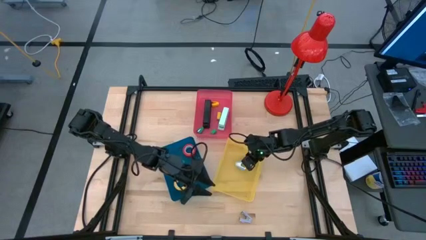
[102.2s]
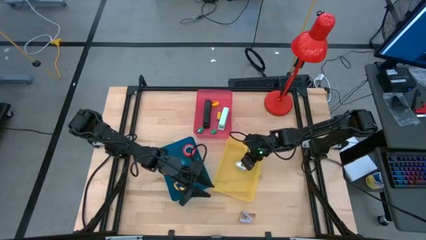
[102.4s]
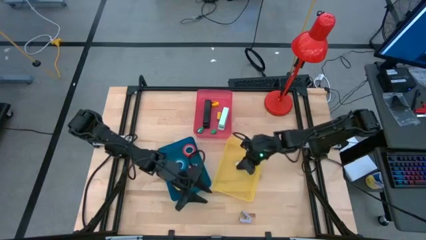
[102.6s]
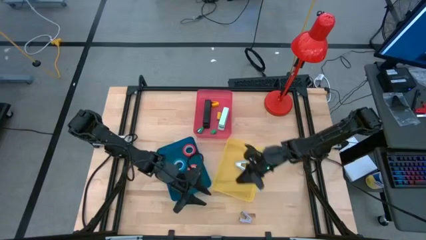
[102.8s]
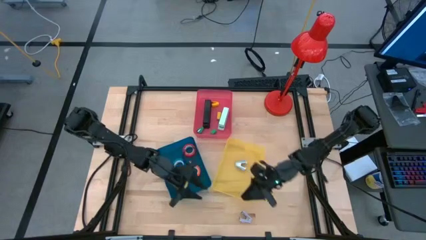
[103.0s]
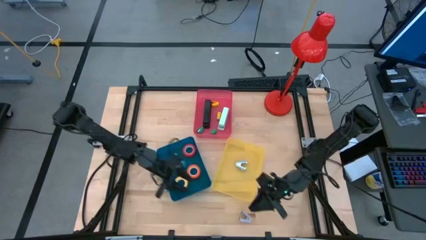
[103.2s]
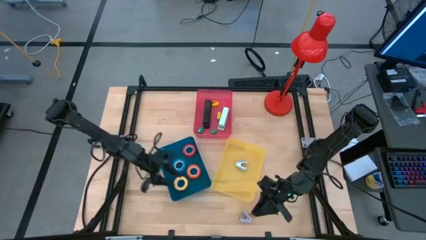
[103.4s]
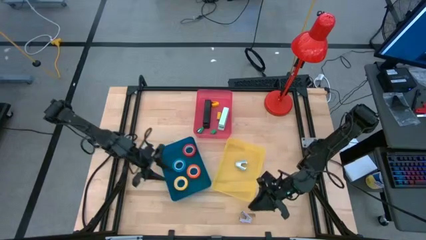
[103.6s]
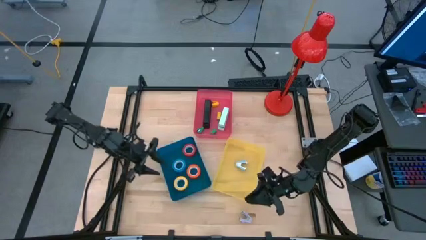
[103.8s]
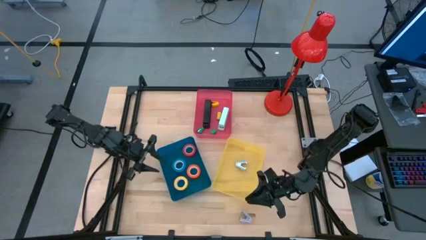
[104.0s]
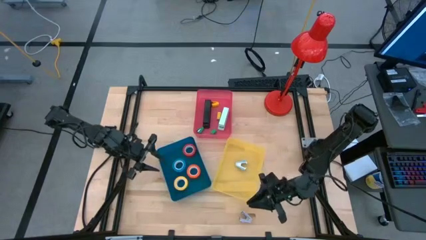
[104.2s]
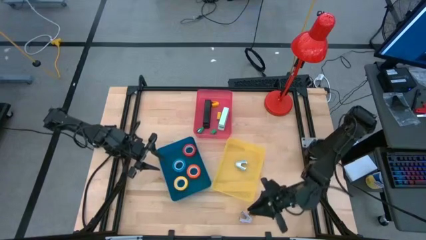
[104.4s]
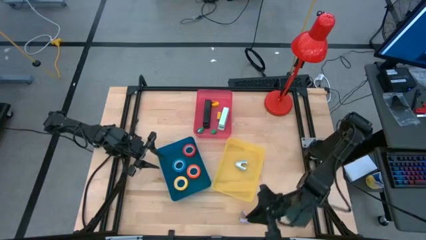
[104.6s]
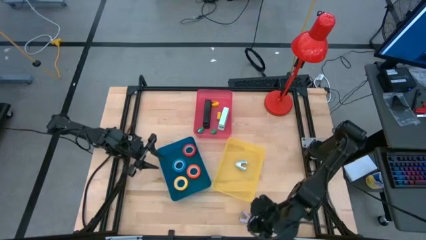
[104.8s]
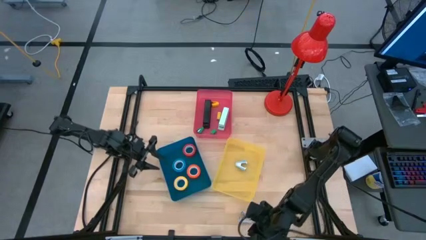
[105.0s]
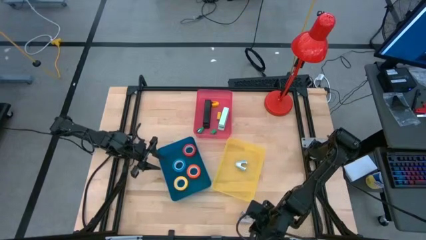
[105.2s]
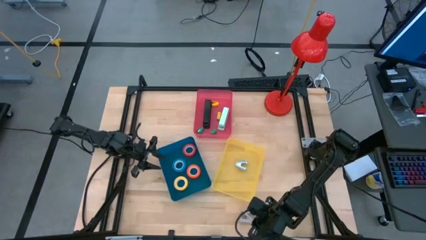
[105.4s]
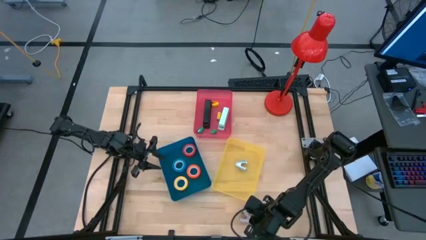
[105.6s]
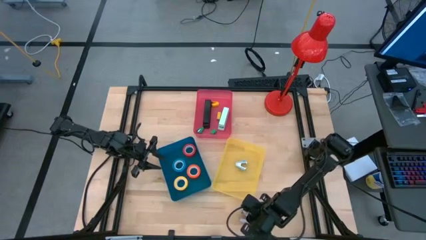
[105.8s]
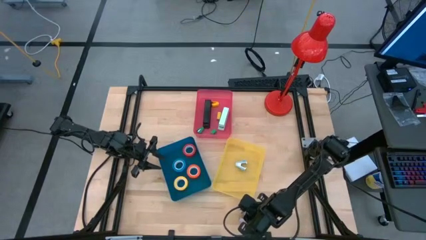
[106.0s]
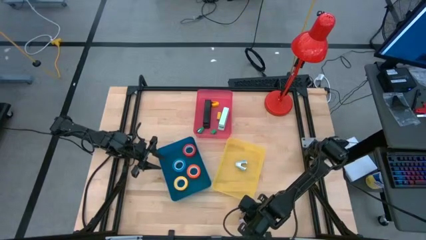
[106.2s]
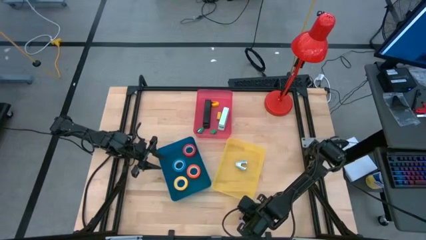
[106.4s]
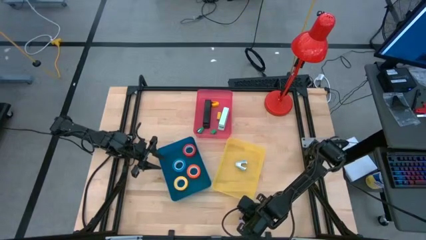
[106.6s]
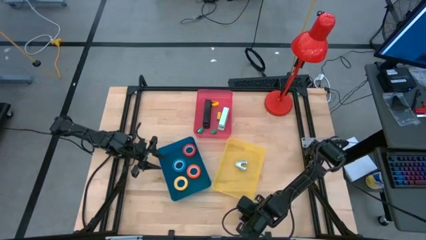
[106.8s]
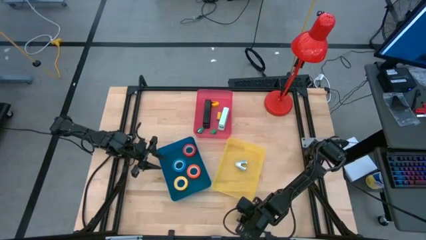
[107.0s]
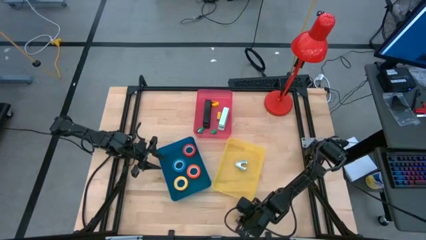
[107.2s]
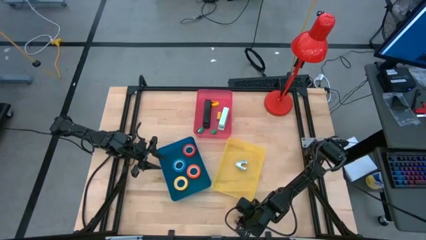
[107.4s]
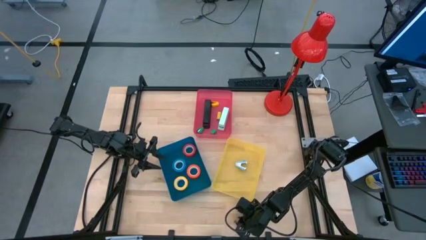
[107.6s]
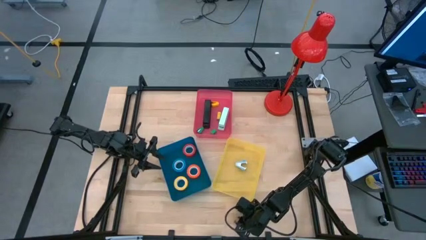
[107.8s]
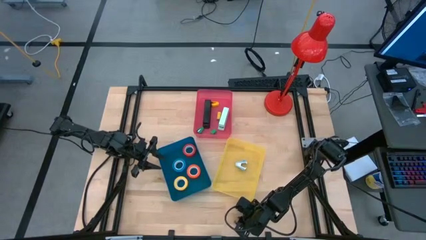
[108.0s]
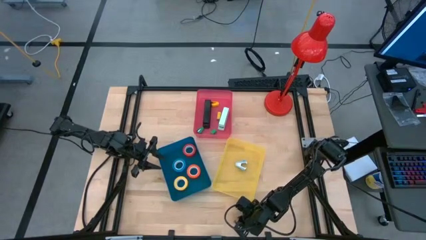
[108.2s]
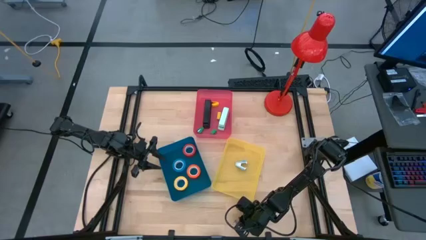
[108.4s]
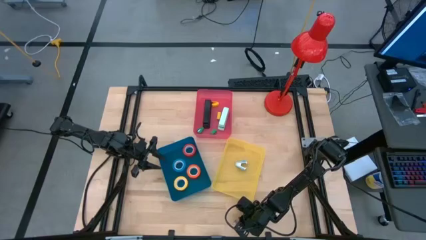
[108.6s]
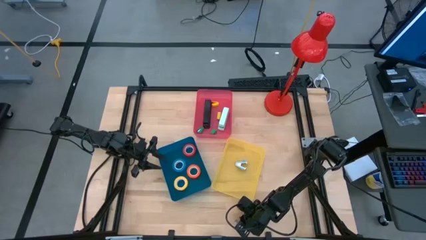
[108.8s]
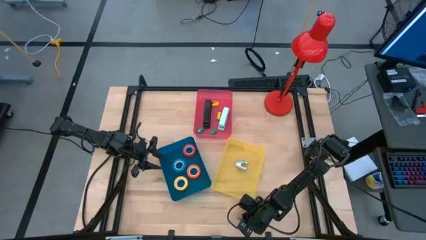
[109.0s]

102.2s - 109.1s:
Task: Pick and place Stapler, Stapler remover, tape
Put the violet staple remover into the yellow bin

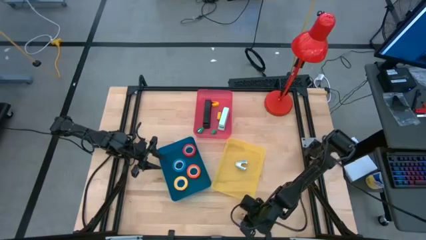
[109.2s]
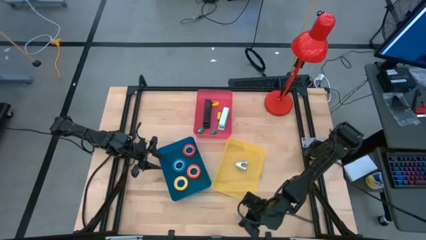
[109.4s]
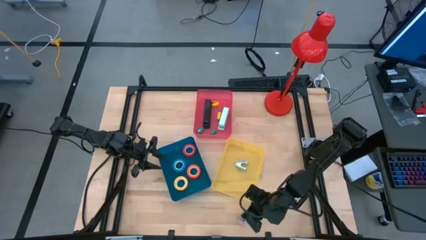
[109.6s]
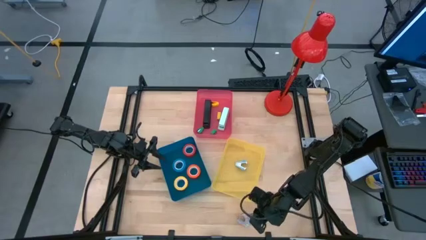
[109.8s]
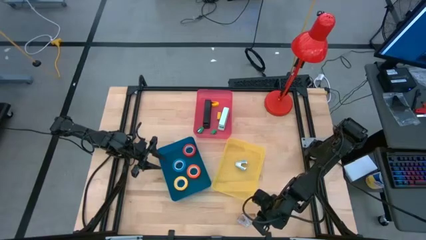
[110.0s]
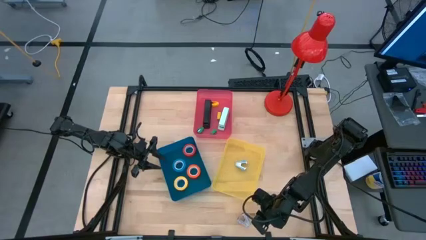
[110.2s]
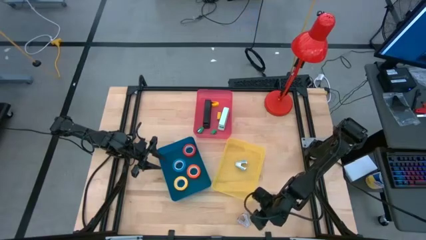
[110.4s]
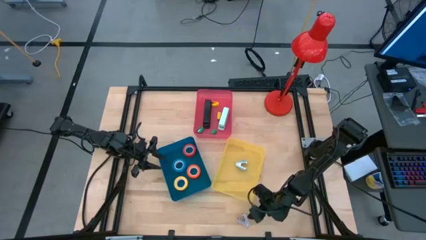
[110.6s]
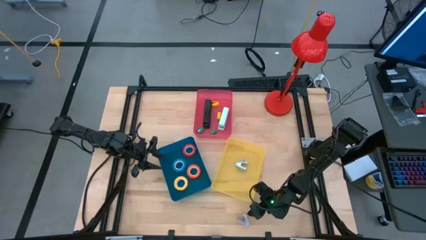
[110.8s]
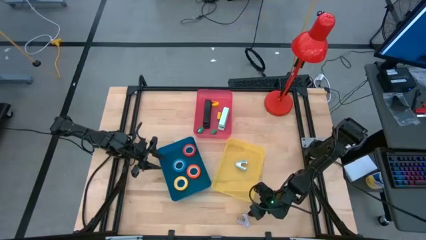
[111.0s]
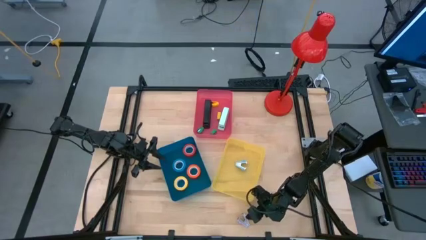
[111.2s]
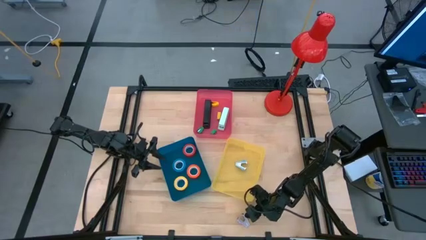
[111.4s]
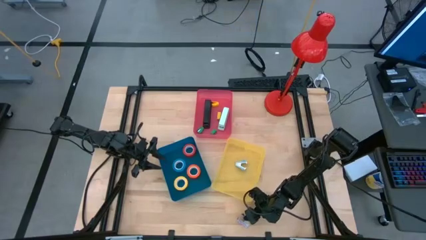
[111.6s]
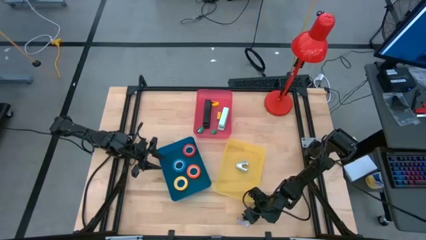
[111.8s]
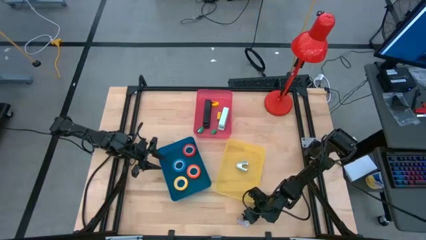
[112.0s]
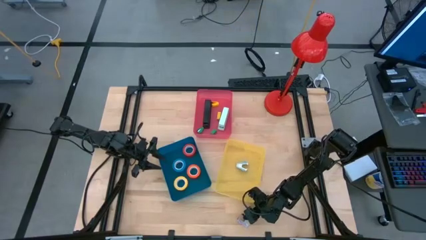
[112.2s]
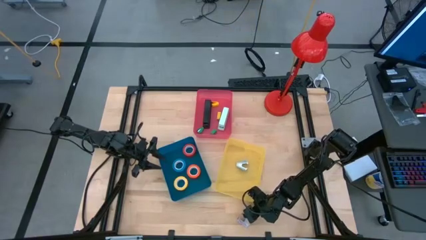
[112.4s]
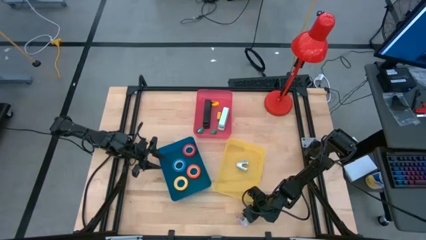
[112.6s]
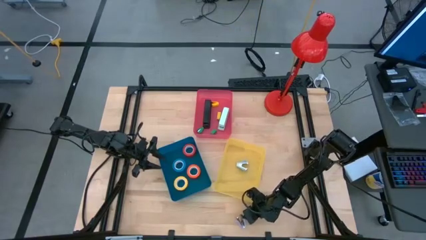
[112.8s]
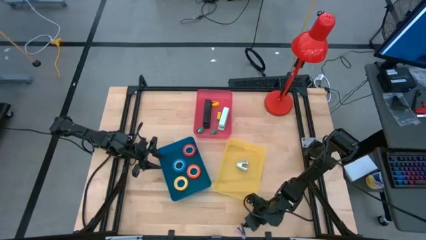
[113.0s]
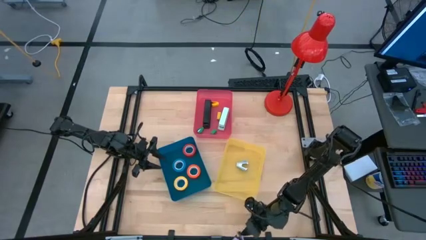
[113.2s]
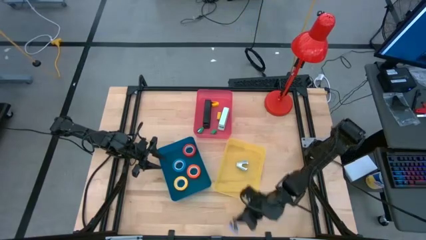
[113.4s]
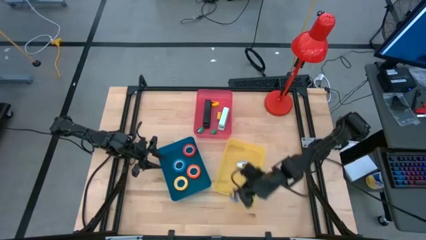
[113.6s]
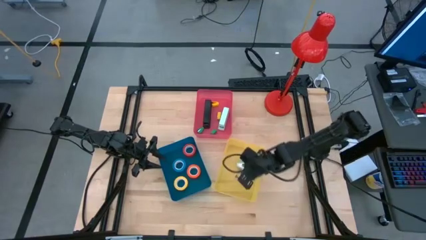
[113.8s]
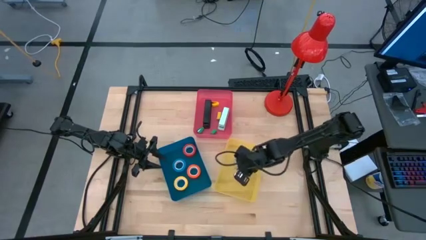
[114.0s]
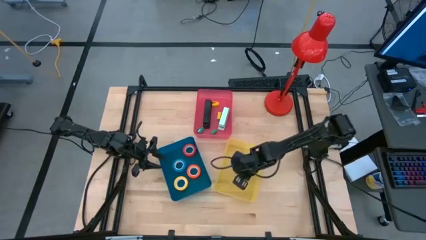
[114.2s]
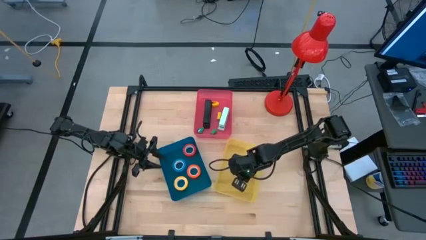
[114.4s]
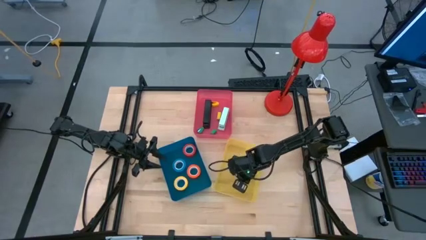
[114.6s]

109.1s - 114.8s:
Put the violet staple remover into the yellow bin

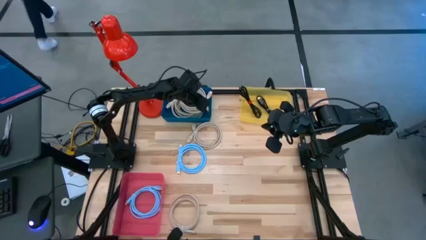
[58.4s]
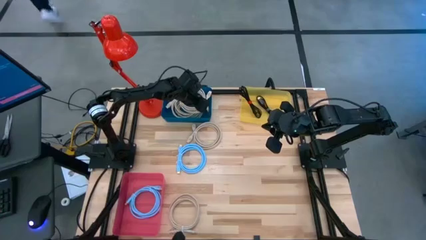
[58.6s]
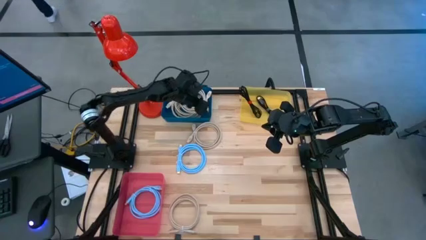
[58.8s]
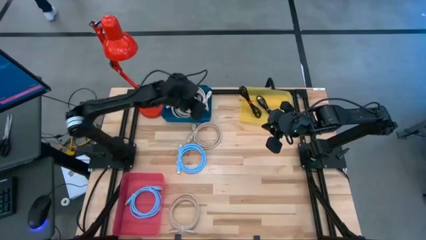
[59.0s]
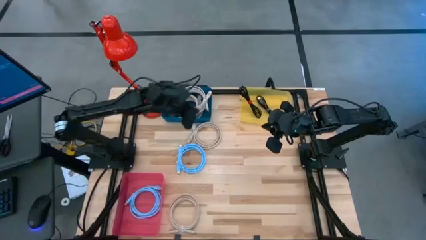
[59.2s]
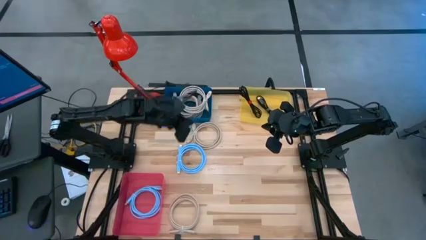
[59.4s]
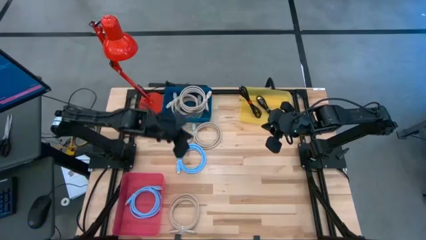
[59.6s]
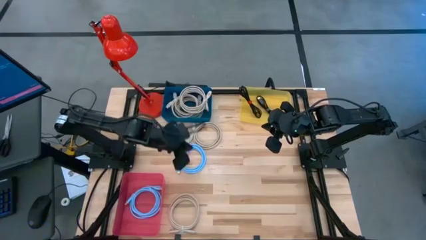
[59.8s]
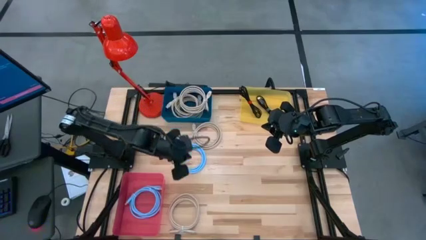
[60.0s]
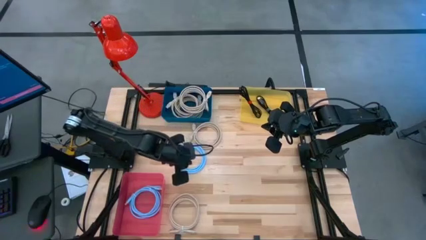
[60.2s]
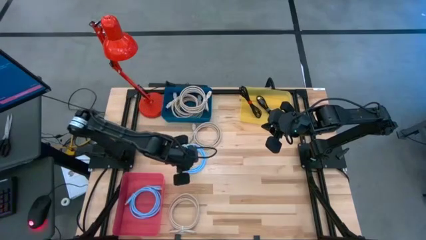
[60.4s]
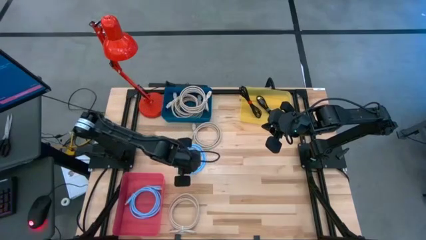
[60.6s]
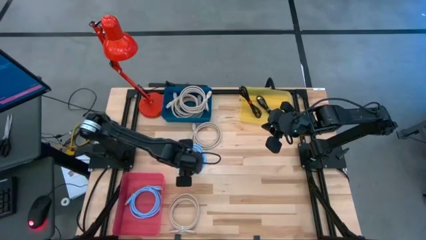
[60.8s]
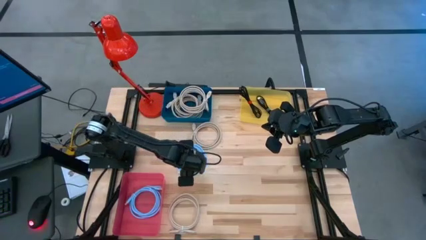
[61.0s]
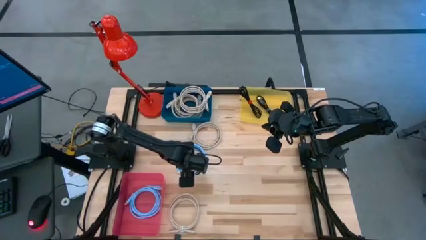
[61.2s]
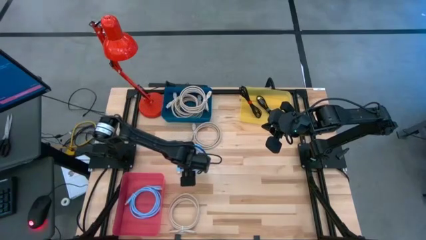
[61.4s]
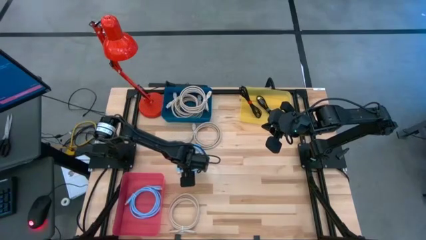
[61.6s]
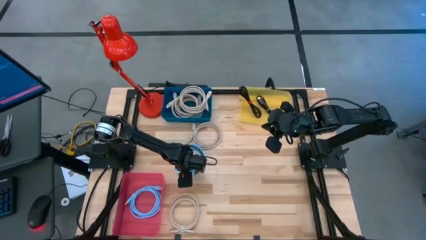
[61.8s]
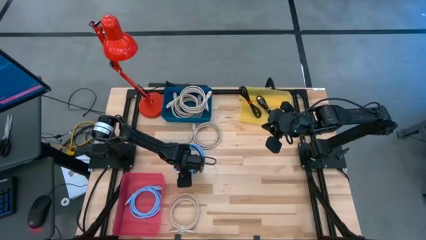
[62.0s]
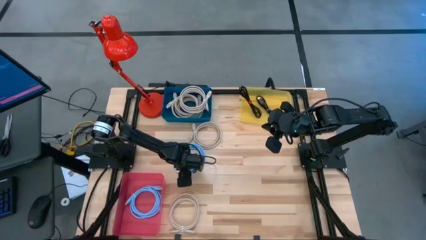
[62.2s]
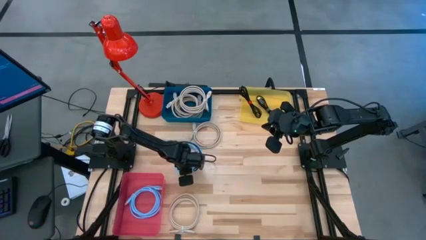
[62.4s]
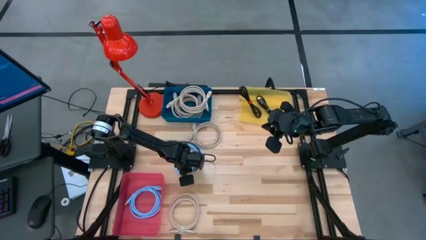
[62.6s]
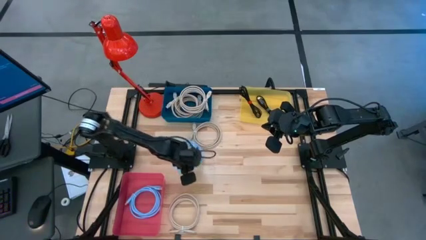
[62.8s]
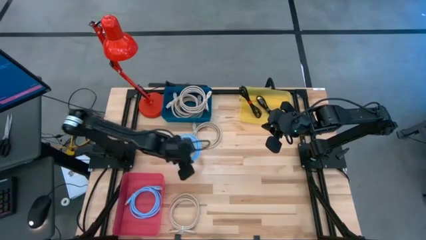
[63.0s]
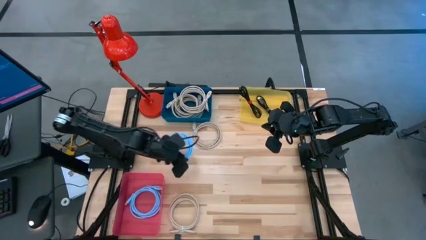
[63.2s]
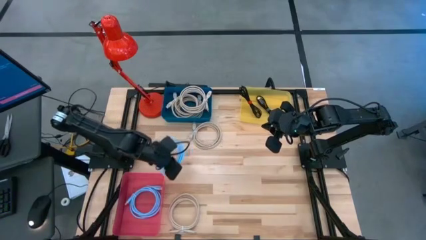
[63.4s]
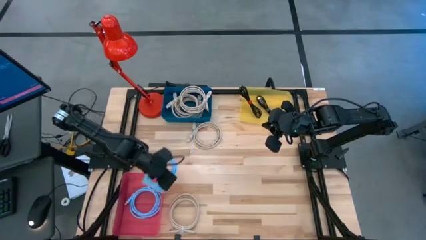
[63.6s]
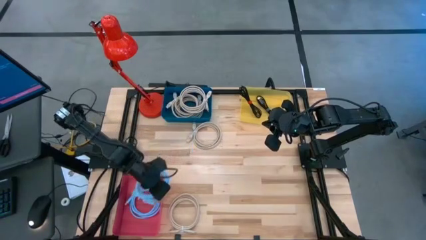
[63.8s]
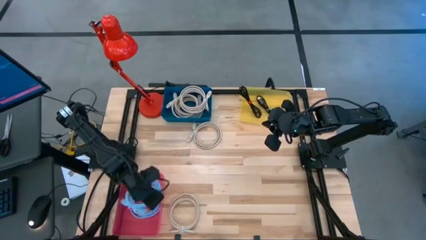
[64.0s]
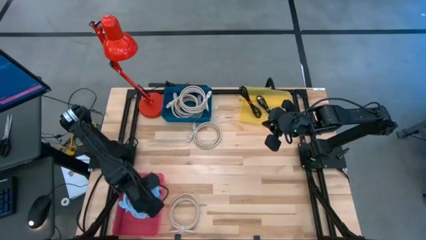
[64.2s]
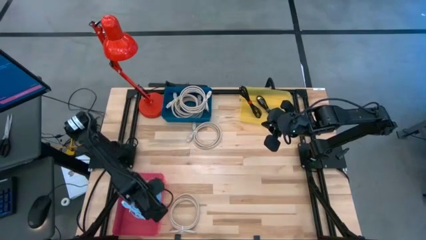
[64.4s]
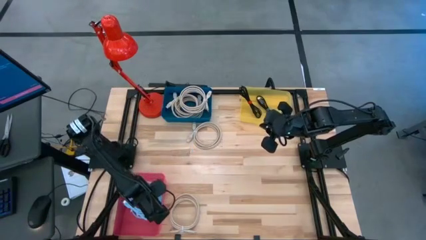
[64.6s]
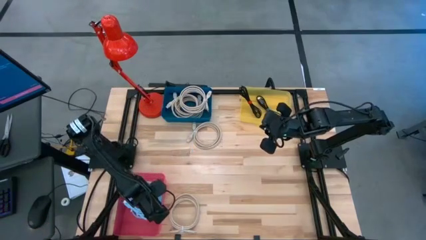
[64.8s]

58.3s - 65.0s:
Task: Pick & Place USB Port
Put the blue display cable into the red bin
